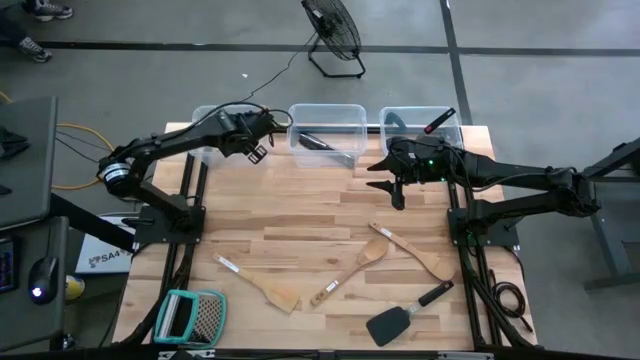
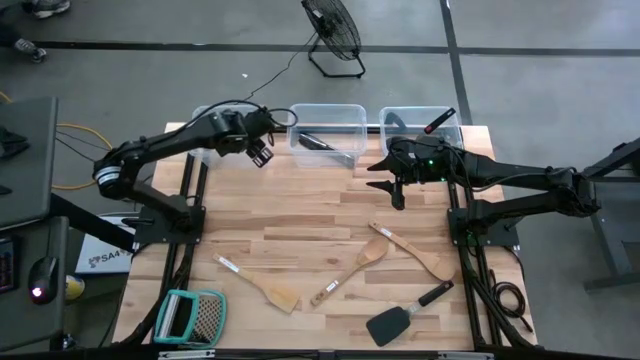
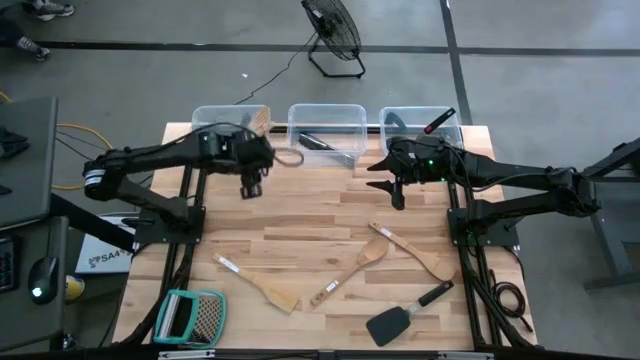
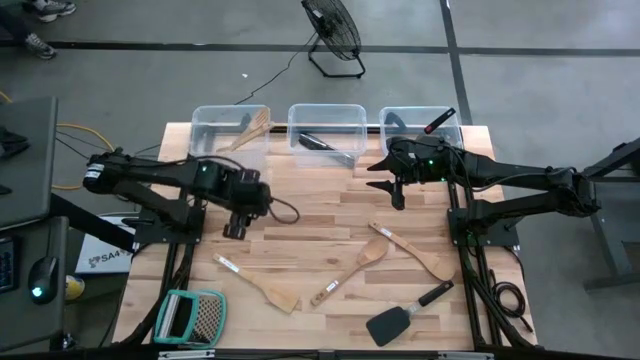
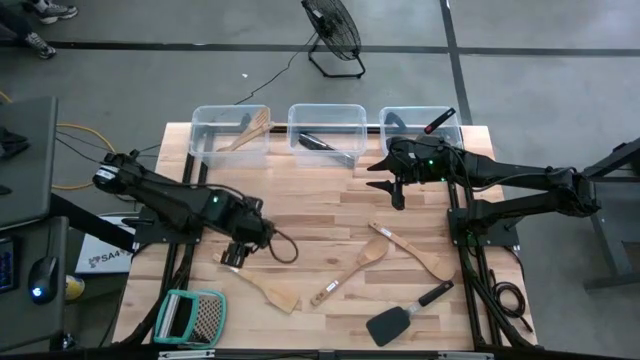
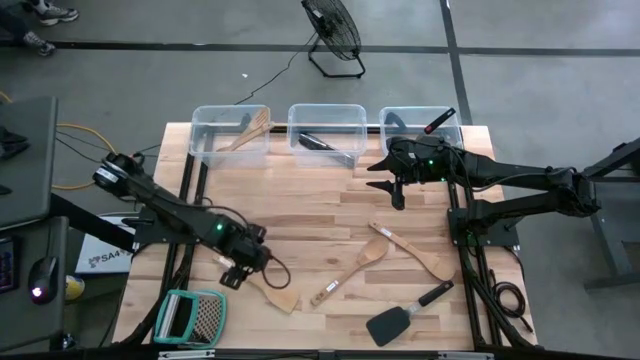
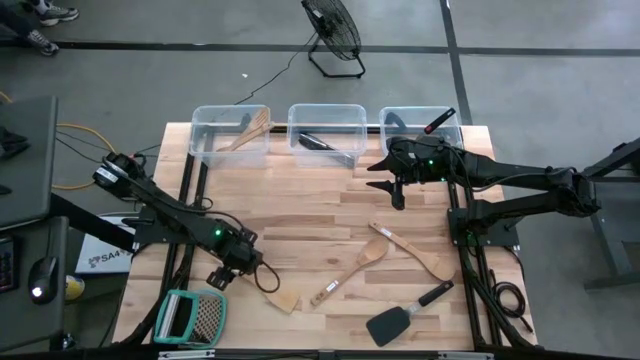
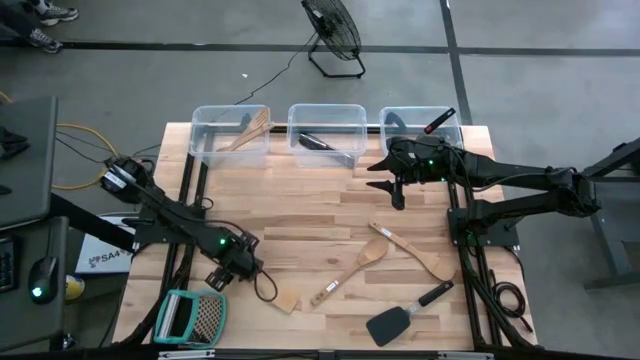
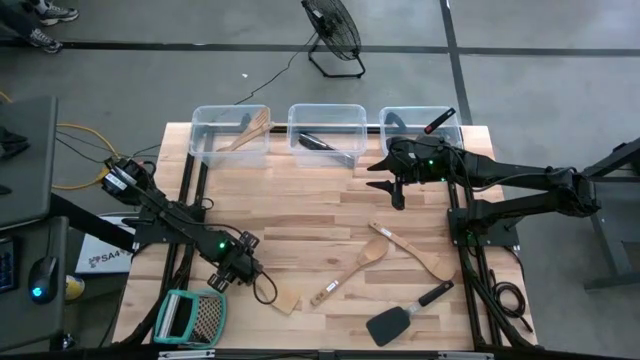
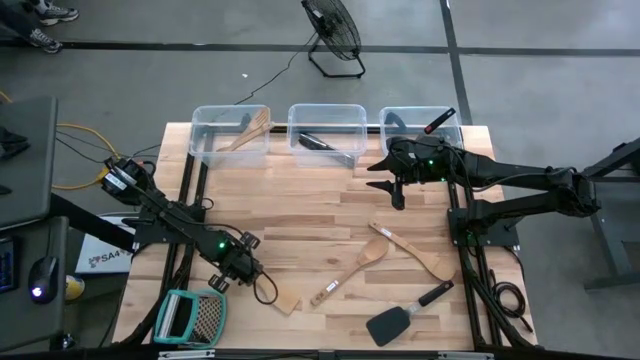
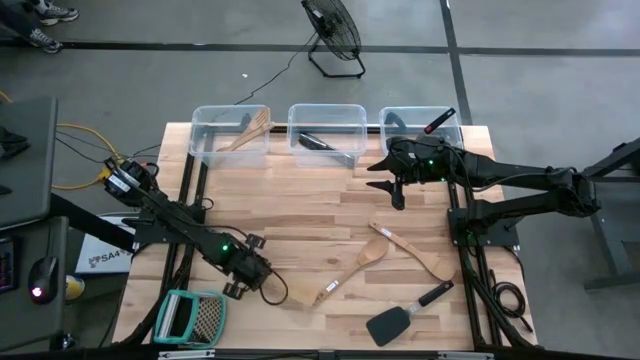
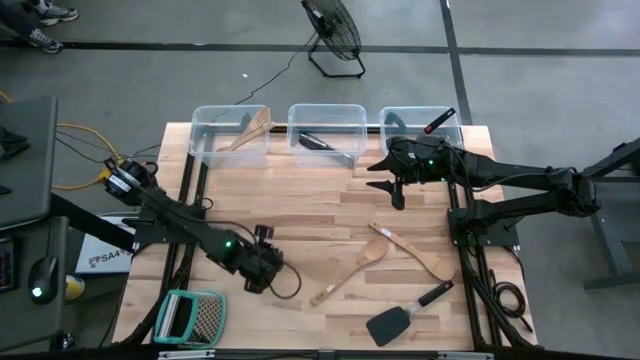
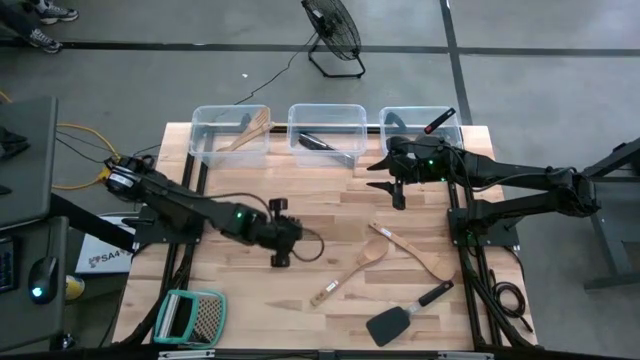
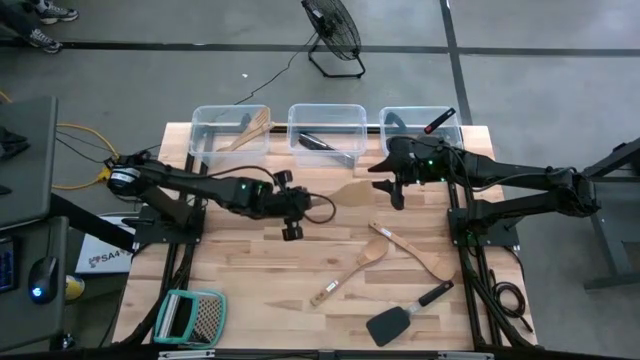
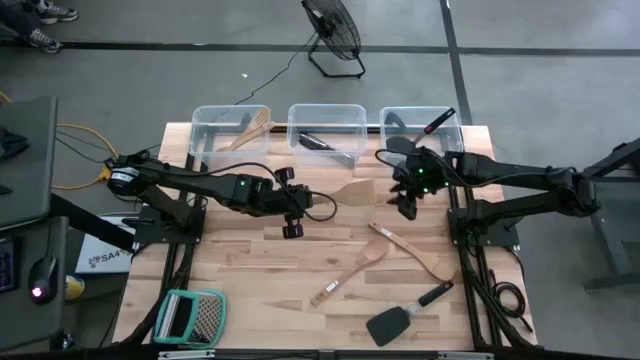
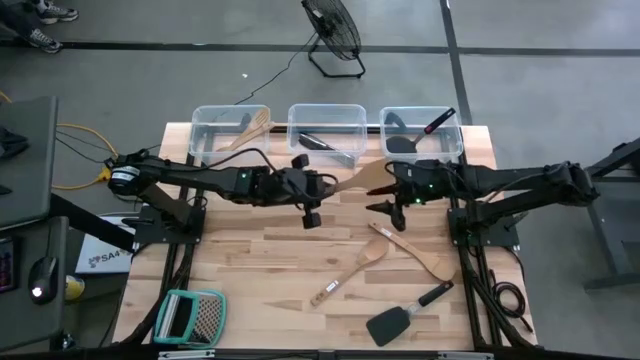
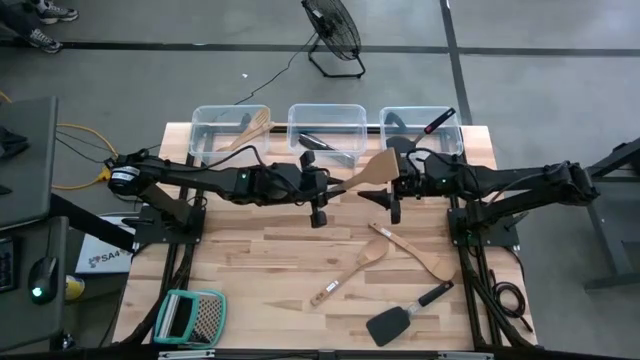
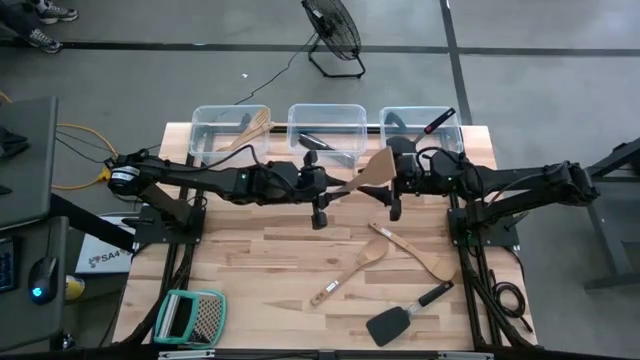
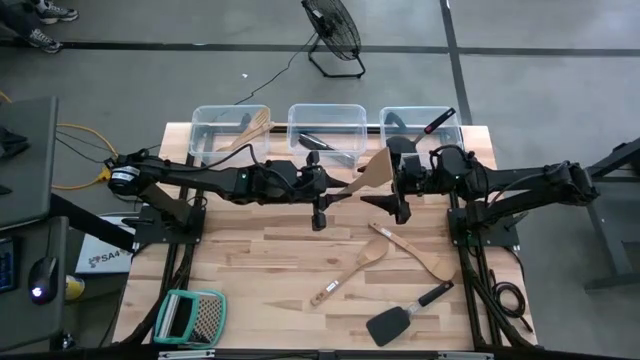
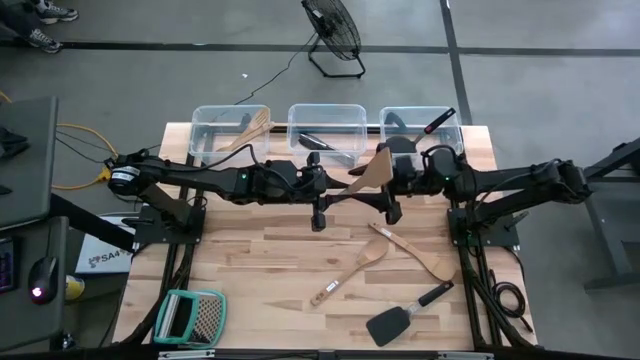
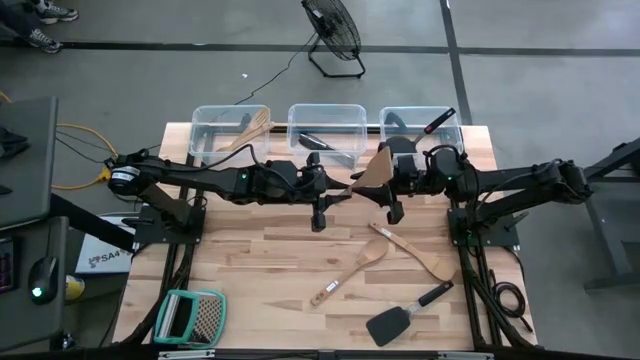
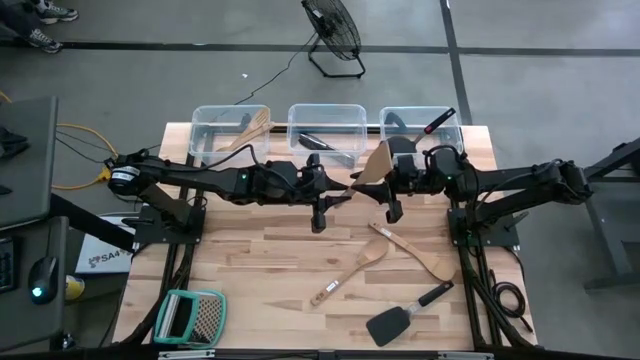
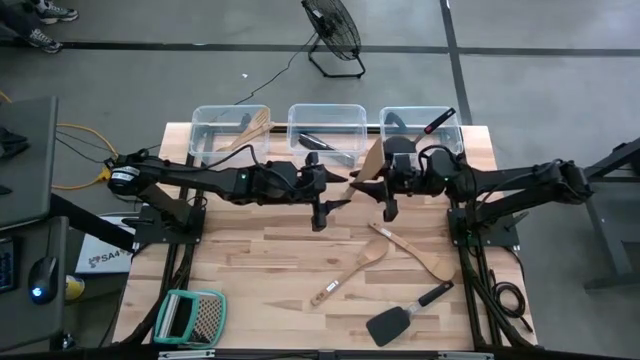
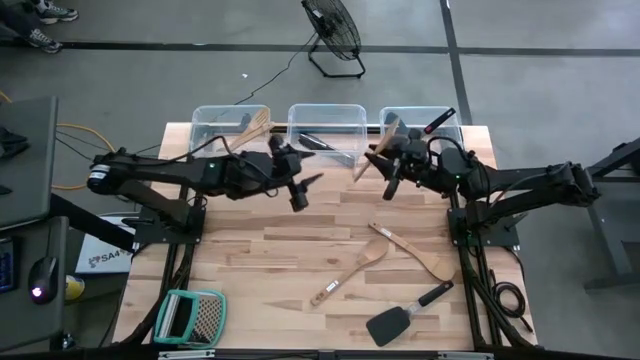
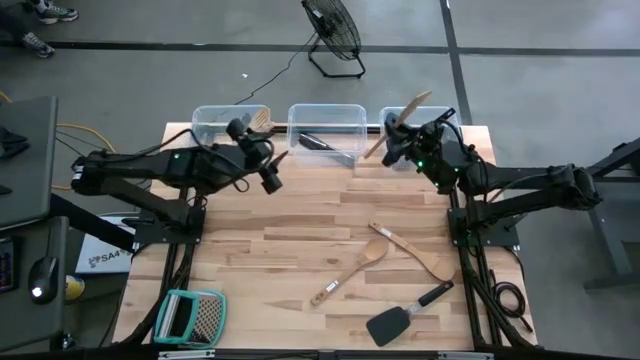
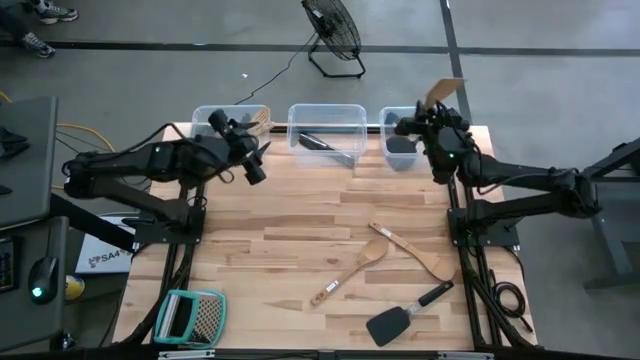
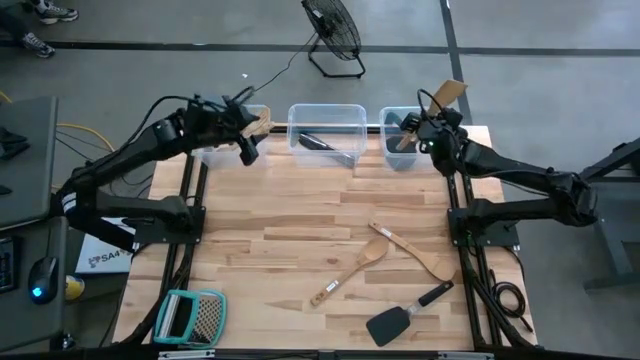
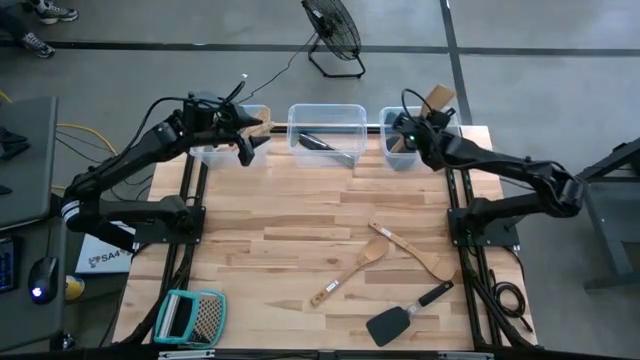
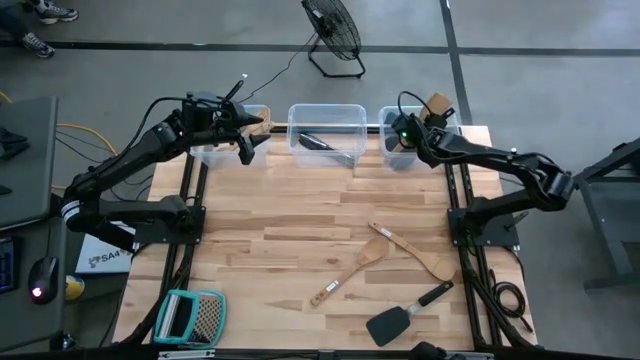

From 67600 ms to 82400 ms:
Task: Pick & Place Kitchen Items
Put the brown wooden spatula into the right transparent bin

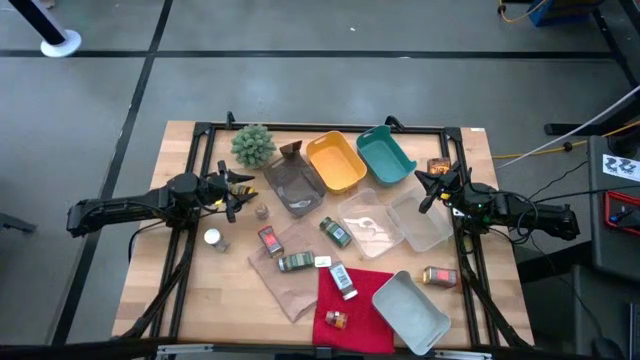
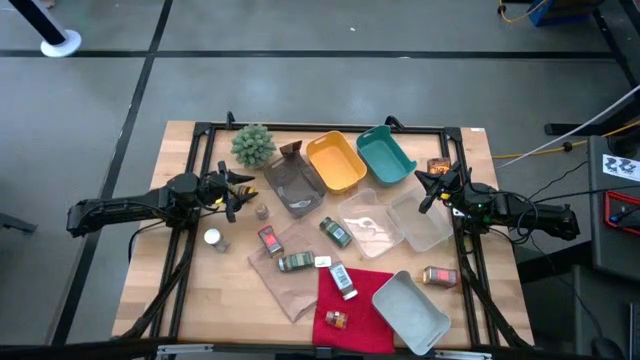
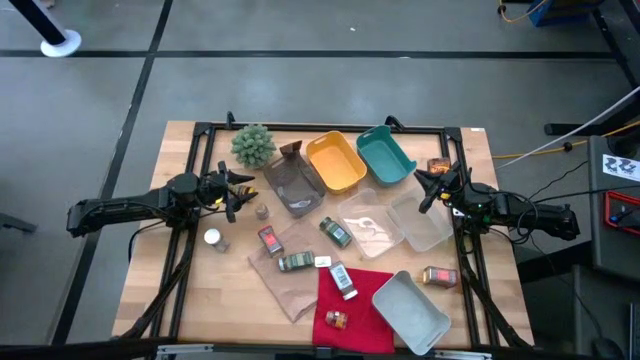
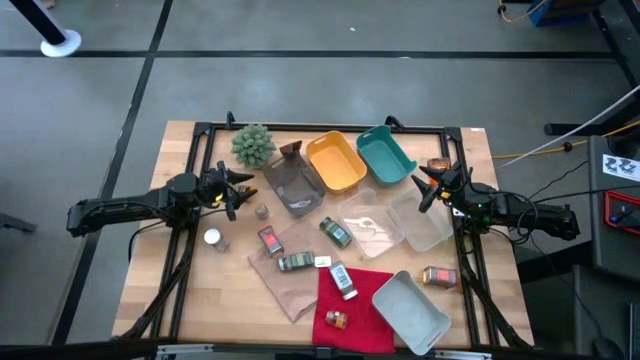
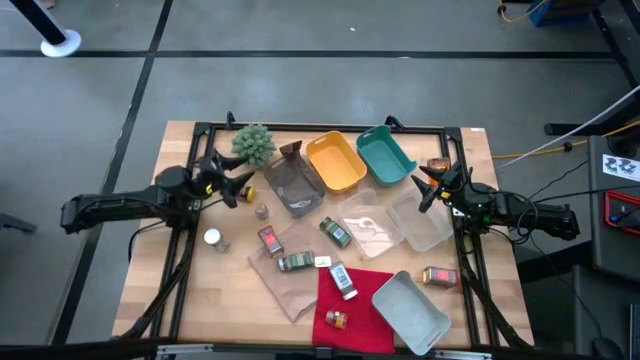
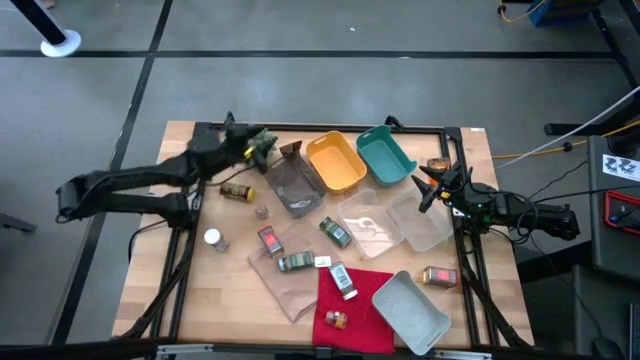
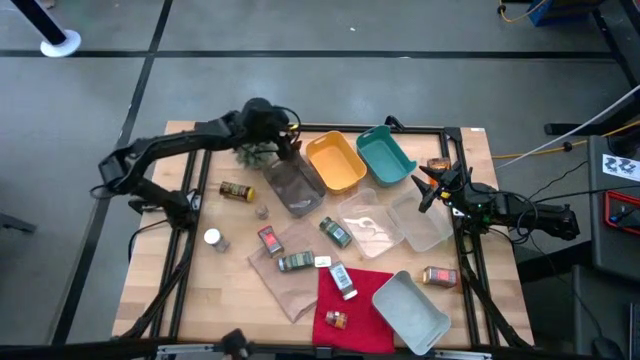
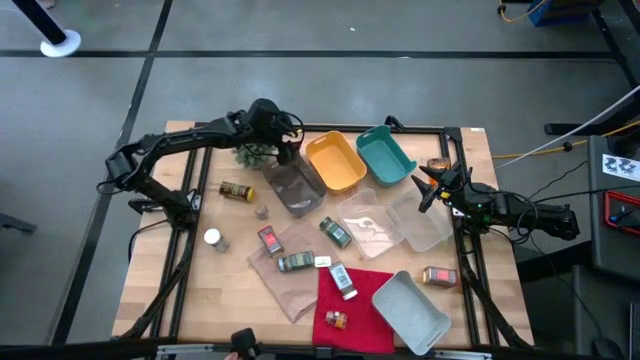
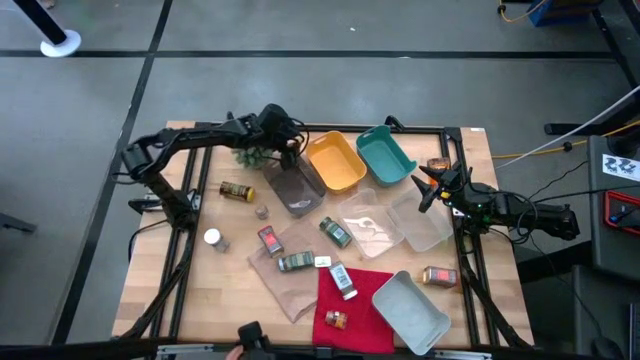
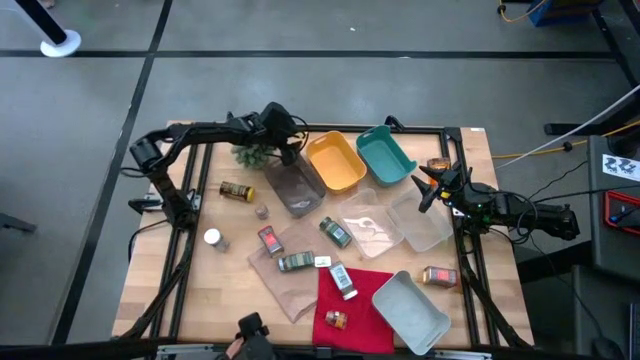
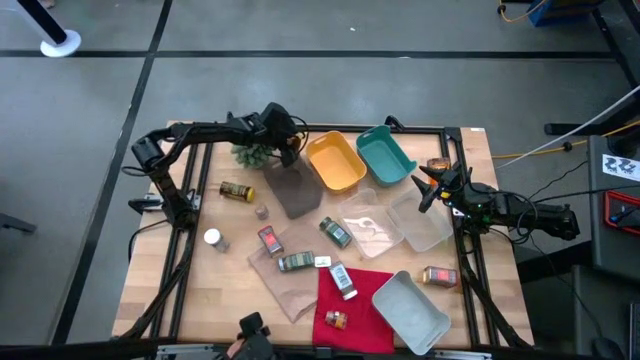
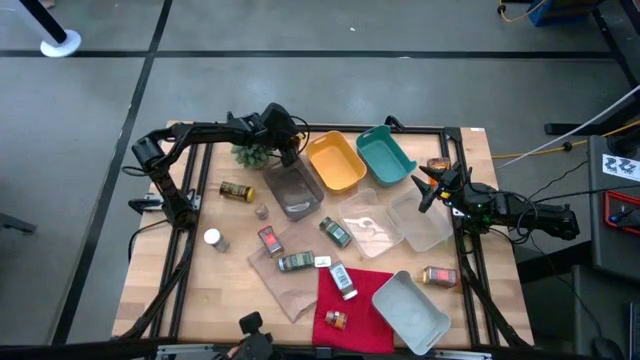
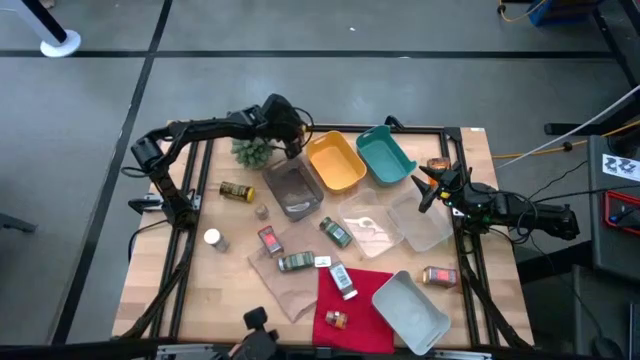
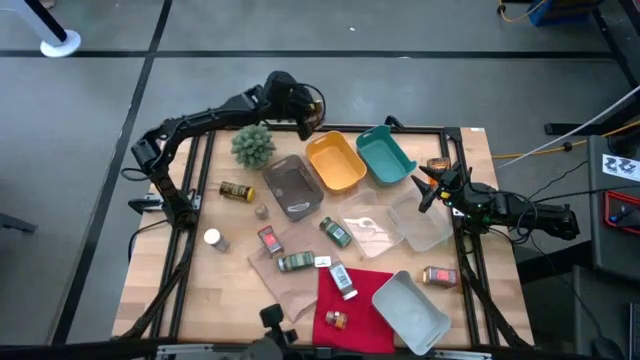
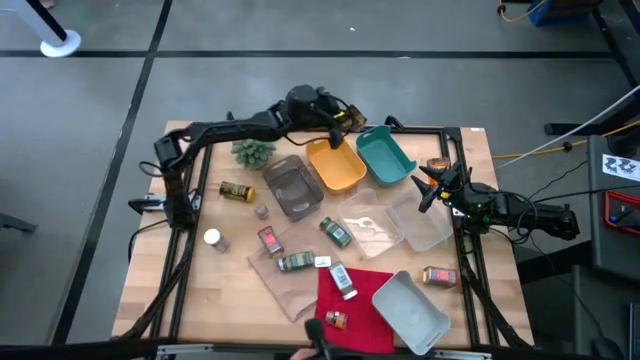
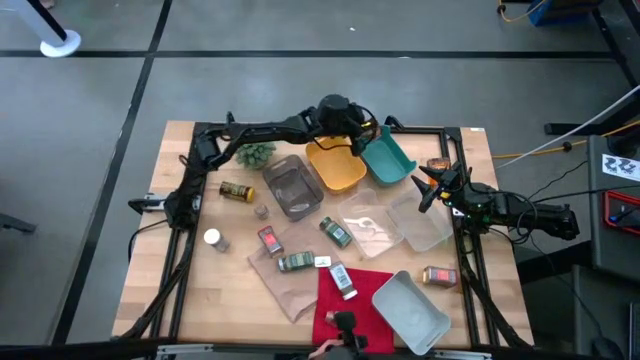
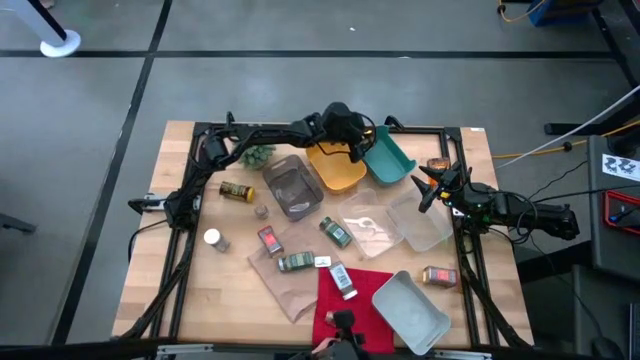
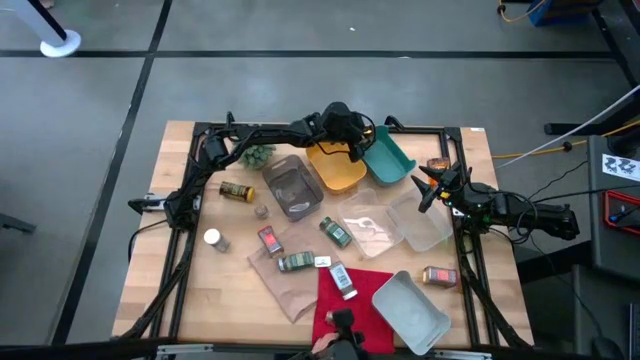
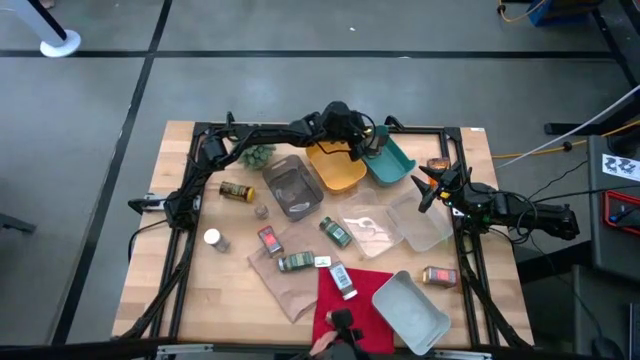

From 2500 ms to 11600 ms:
Task: Sort spices by type
Put the left brown seasoning pack into the green bin
